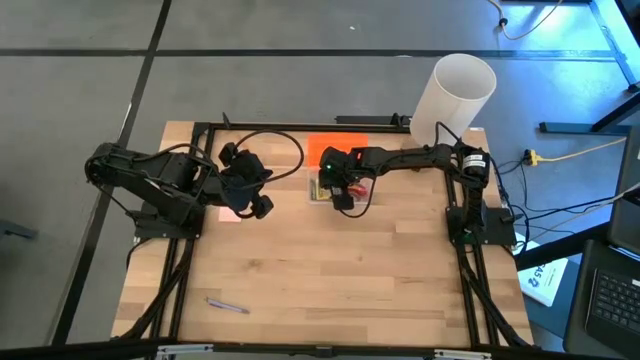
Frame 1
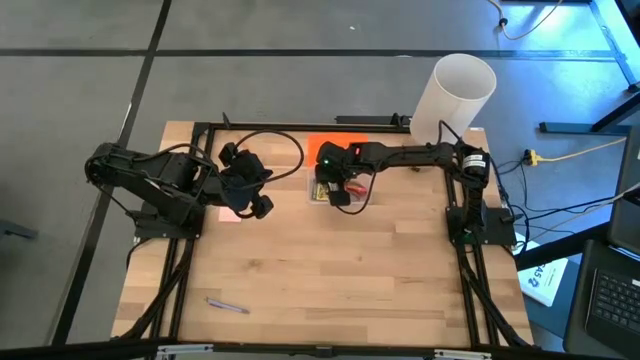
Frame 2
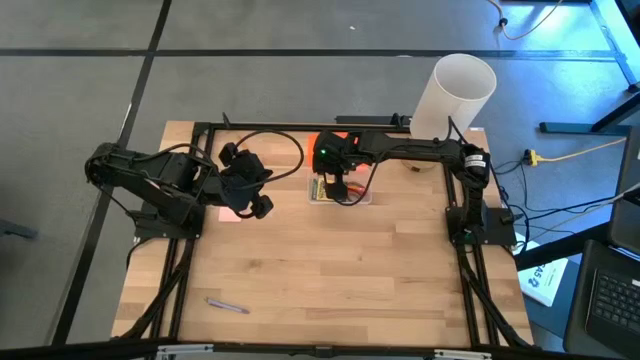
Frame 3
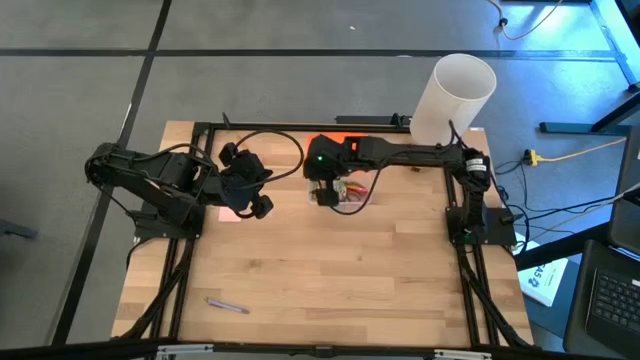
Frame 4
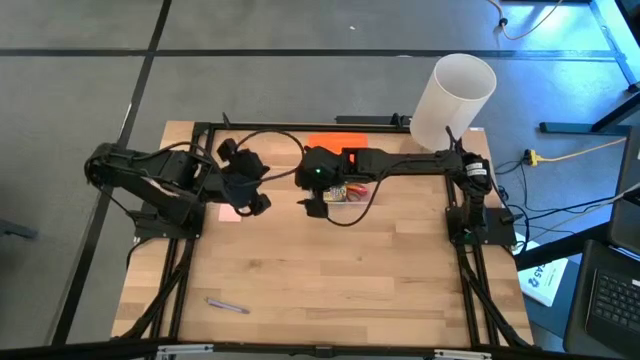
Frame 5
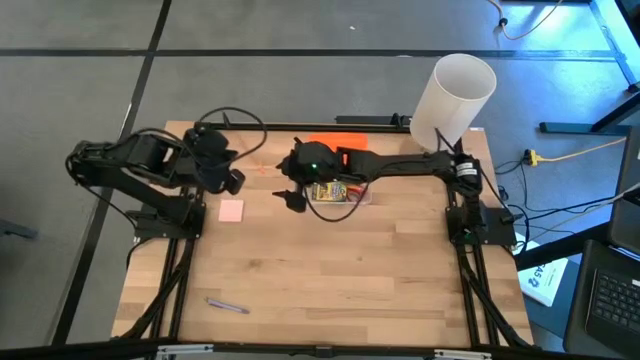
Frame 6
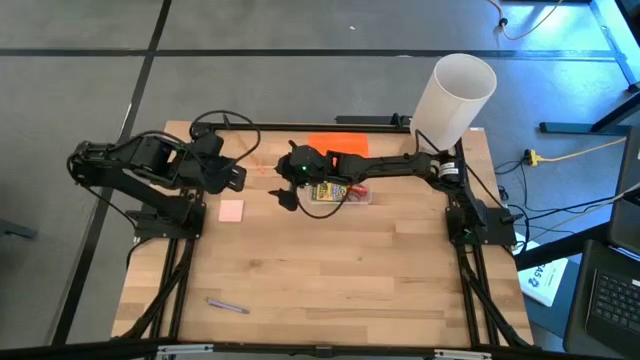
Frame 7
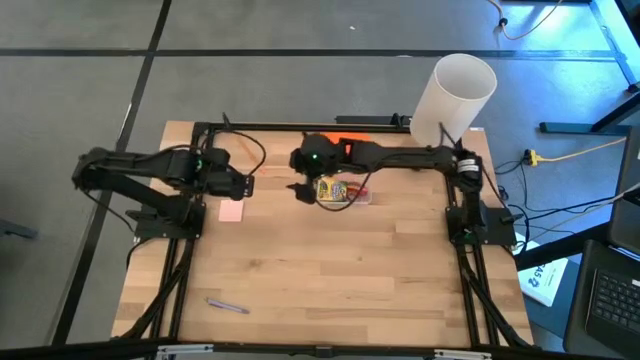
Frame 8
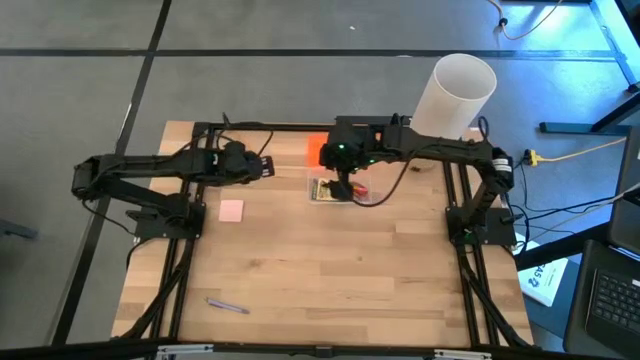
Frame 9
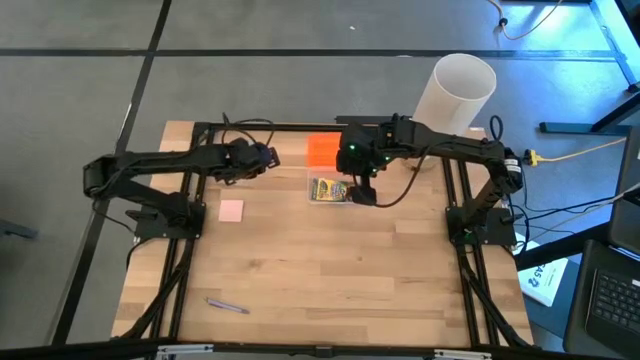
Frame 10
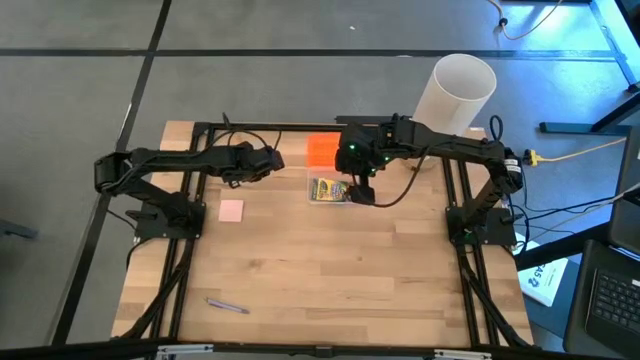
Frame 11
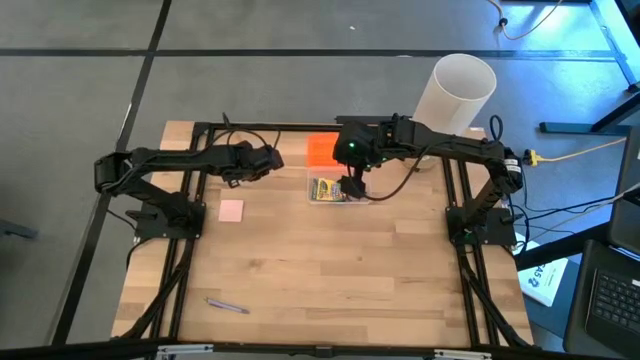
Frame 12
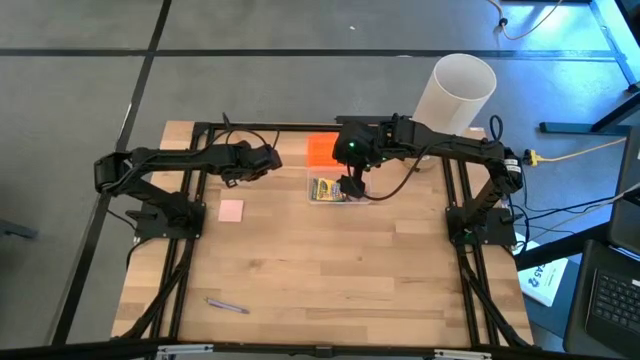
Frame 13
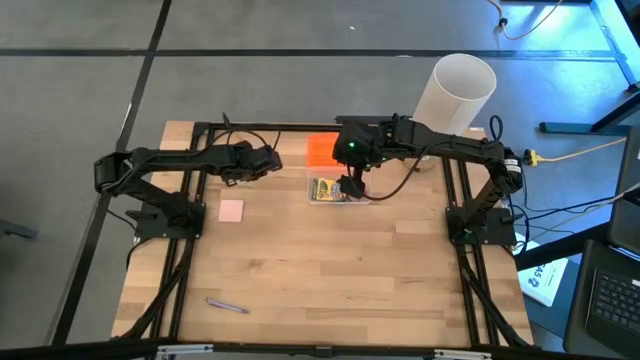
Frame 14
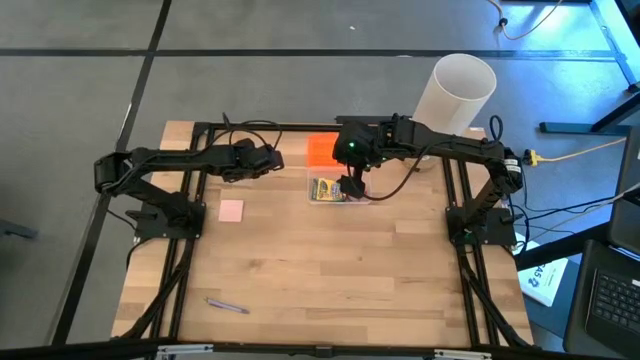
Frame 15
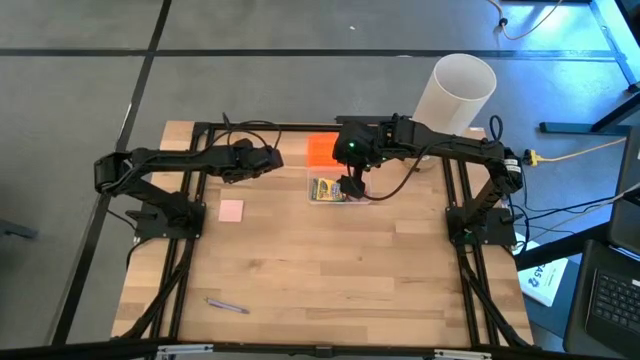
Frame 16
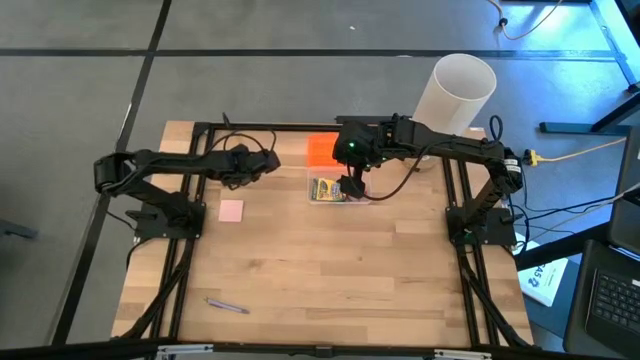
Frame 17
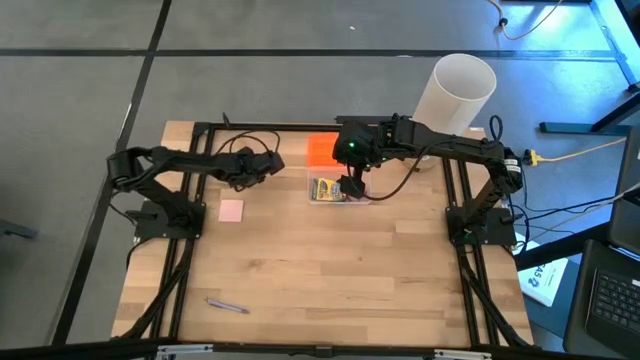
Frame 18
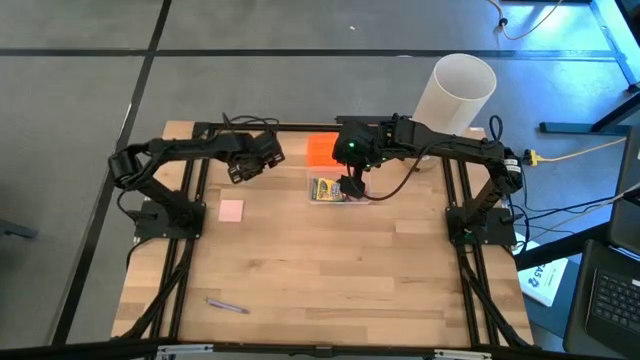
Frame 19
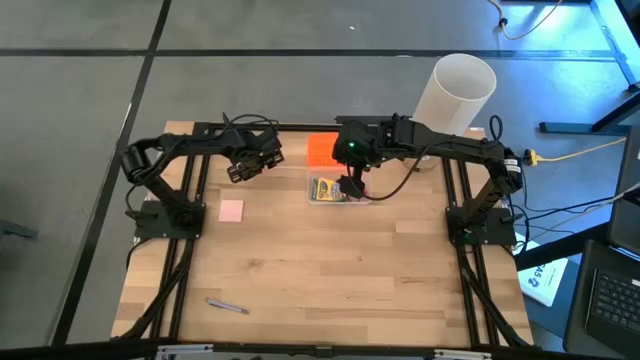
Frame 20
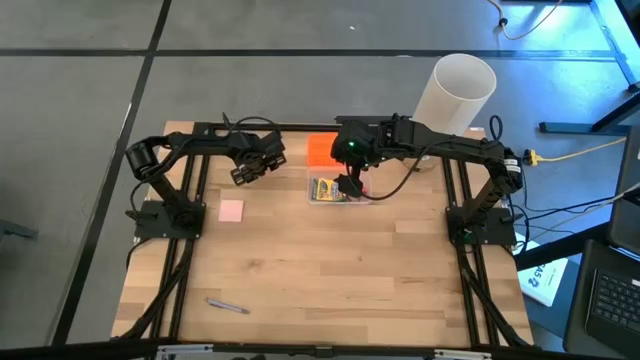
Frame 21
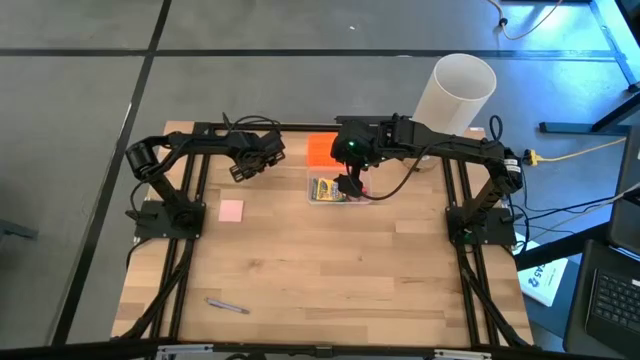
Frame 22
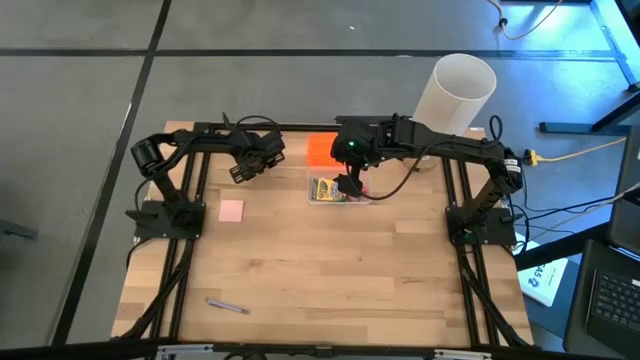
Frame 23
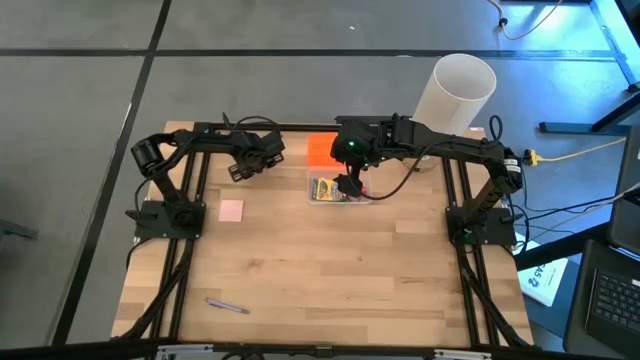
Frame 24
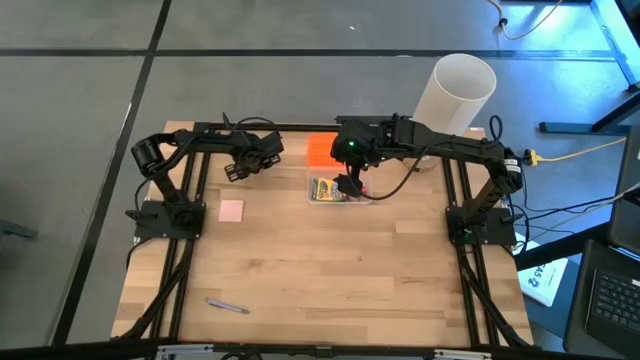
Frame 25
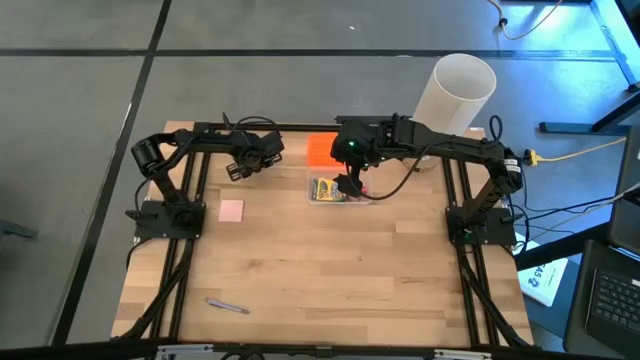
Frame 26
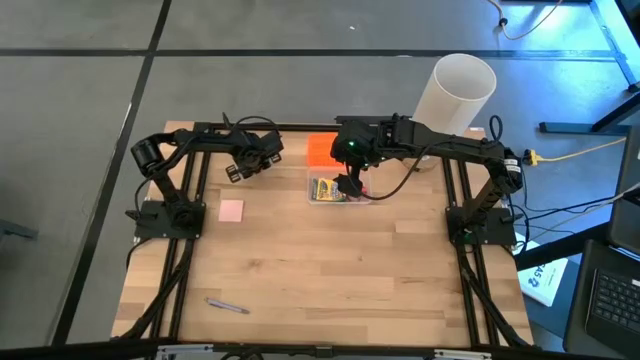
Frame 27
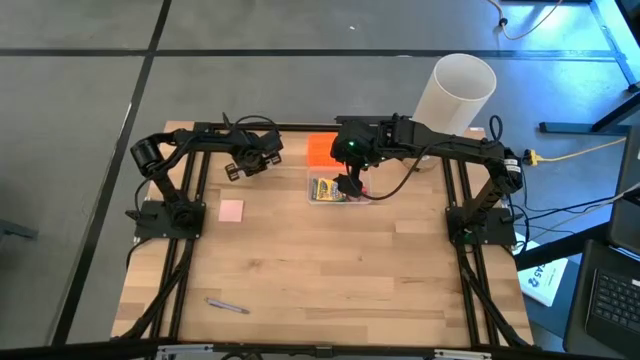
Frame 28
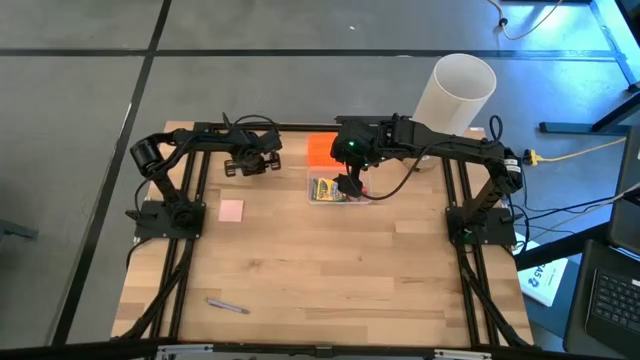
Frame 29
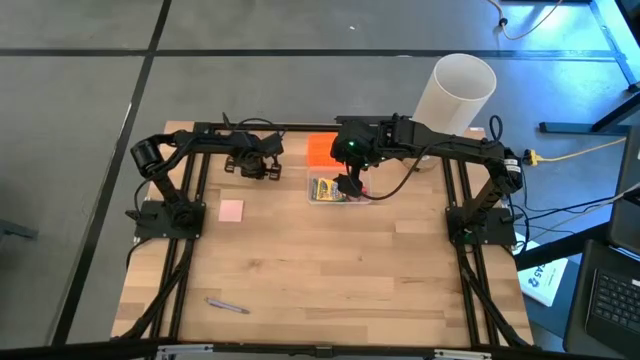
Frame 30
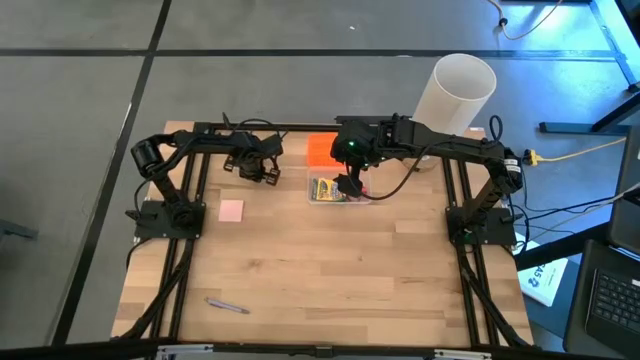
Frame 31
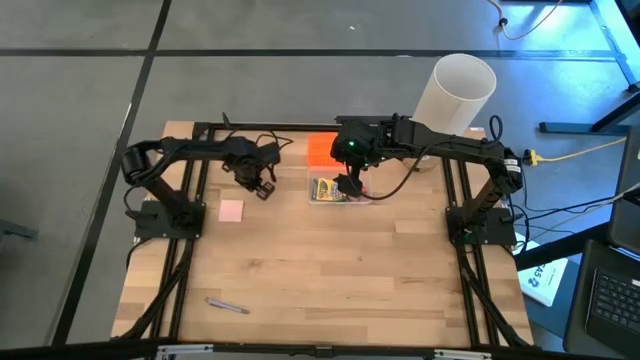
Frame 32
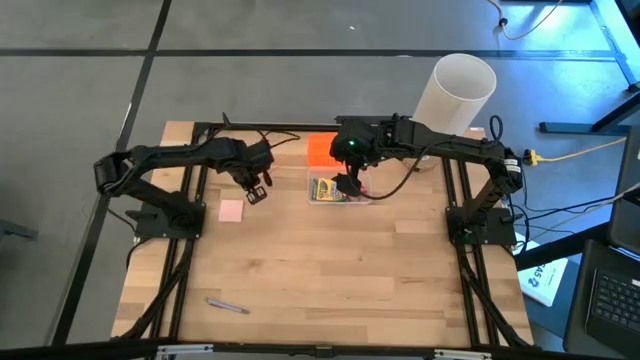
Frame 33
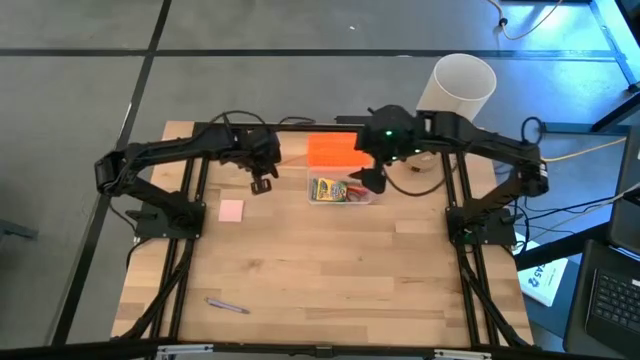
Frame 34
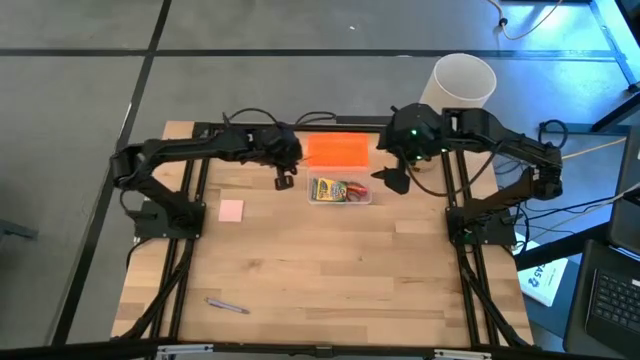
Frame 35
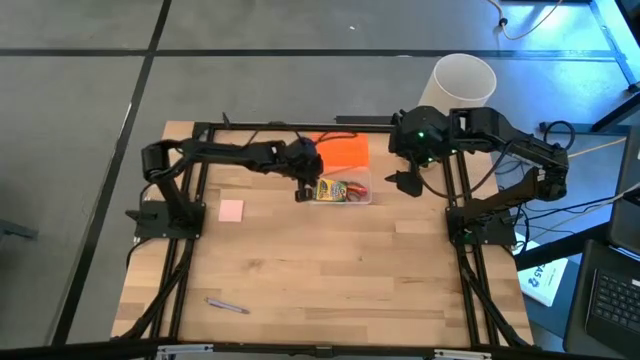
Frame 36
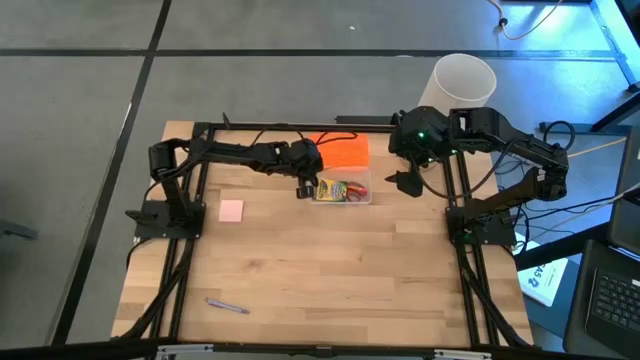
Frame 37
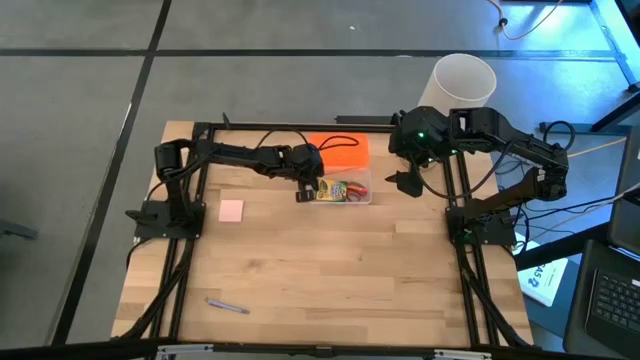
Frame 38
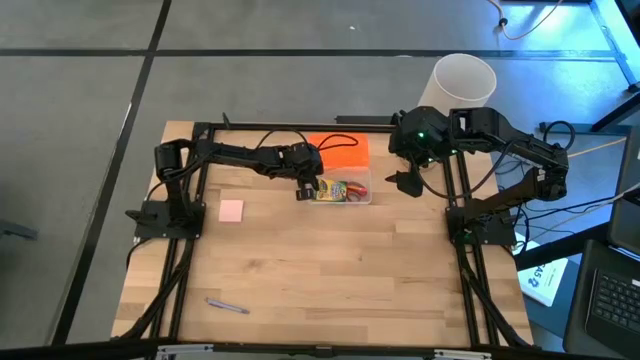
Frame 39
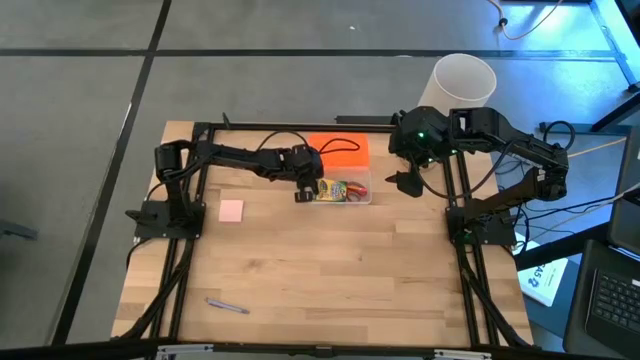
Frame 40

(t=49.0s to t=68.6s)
Task: Pack school essentials
Put the orange pencil into the orange supply box
